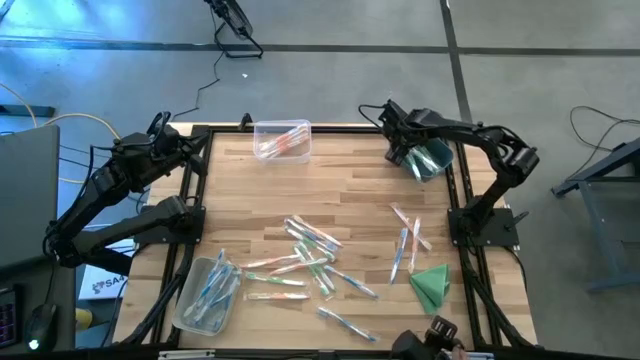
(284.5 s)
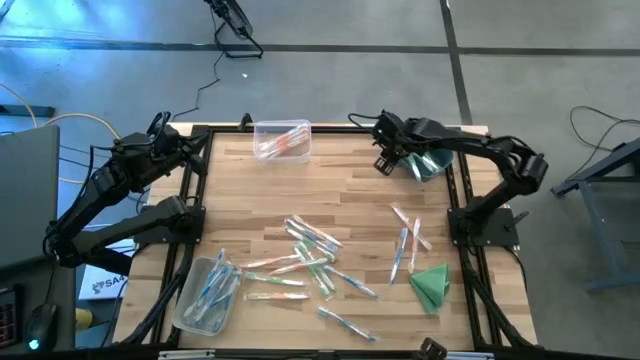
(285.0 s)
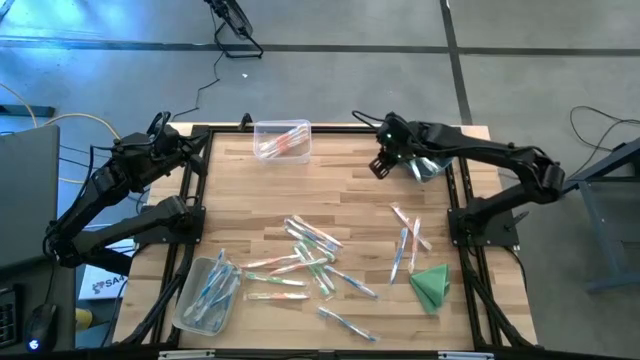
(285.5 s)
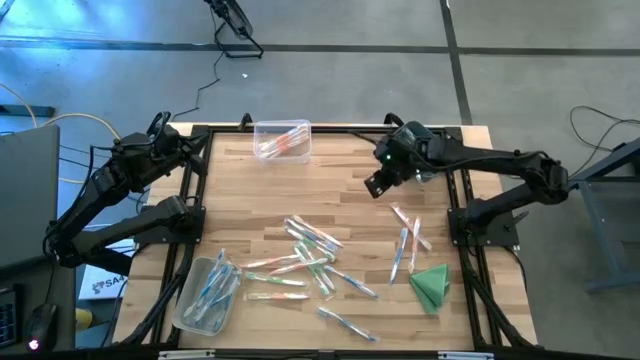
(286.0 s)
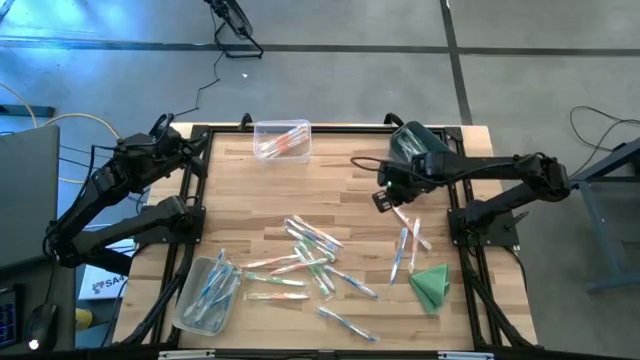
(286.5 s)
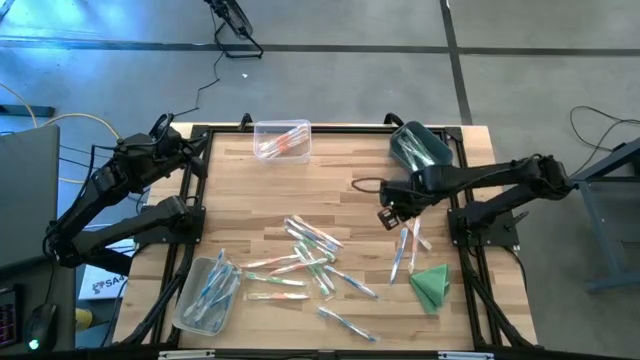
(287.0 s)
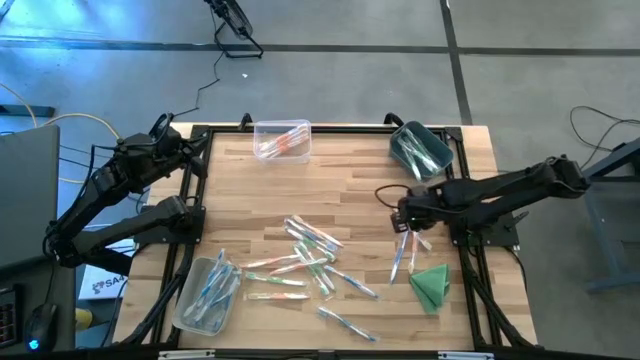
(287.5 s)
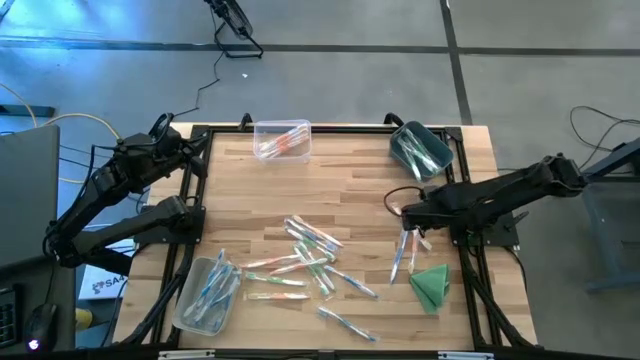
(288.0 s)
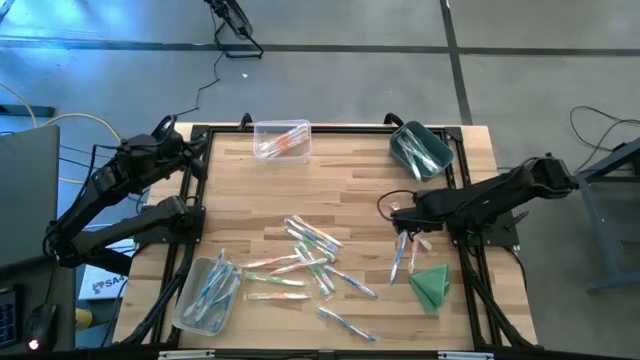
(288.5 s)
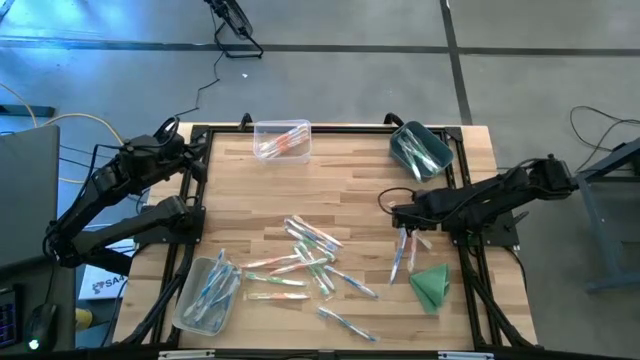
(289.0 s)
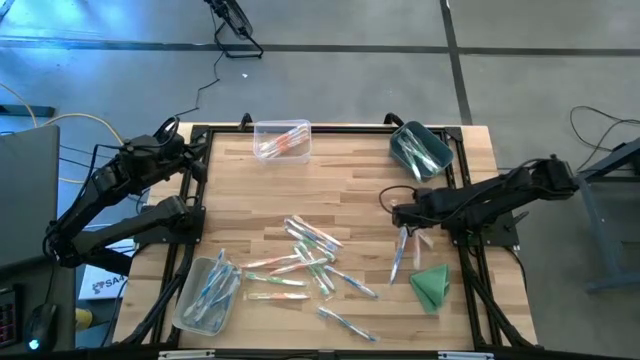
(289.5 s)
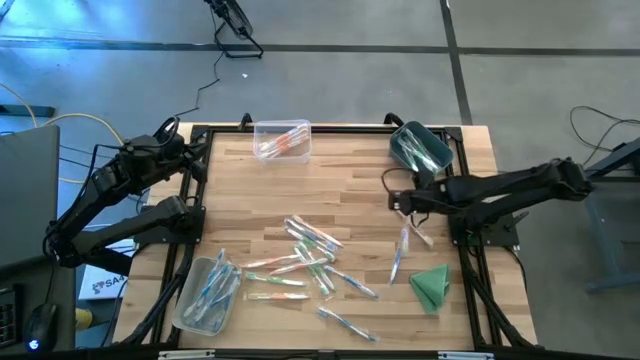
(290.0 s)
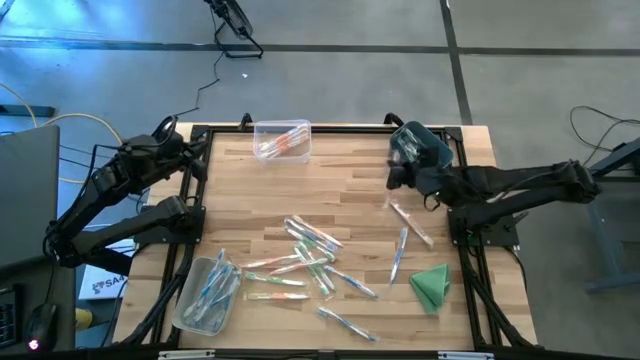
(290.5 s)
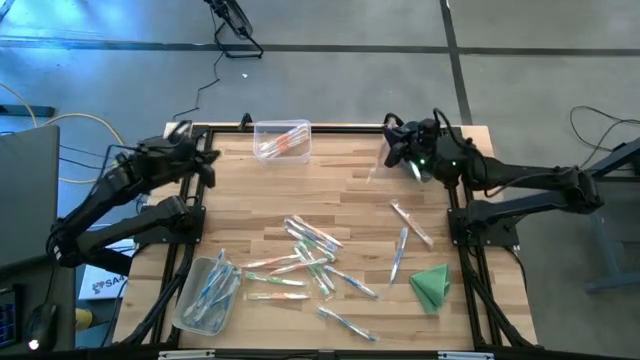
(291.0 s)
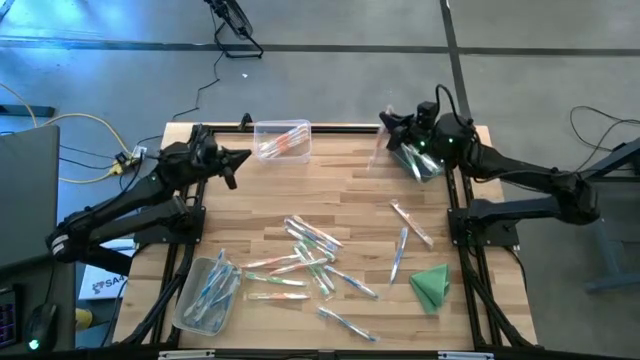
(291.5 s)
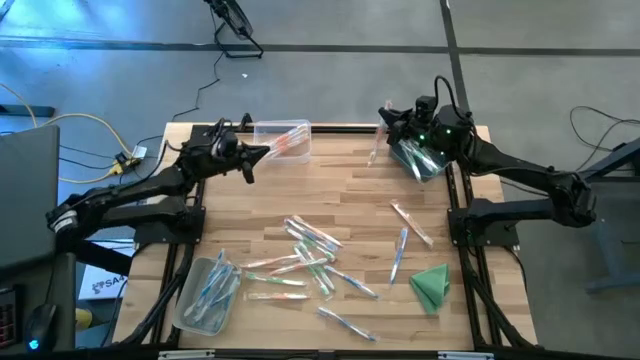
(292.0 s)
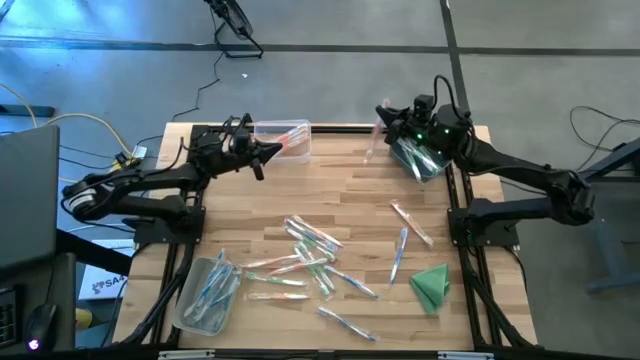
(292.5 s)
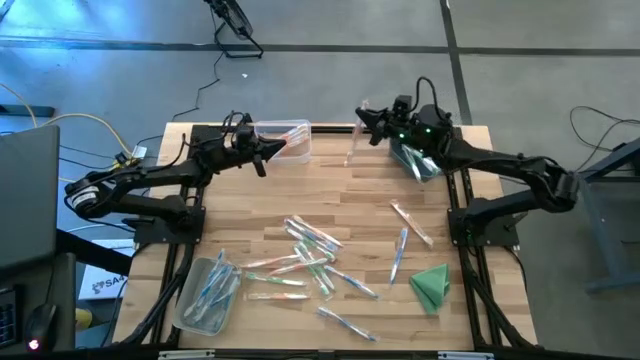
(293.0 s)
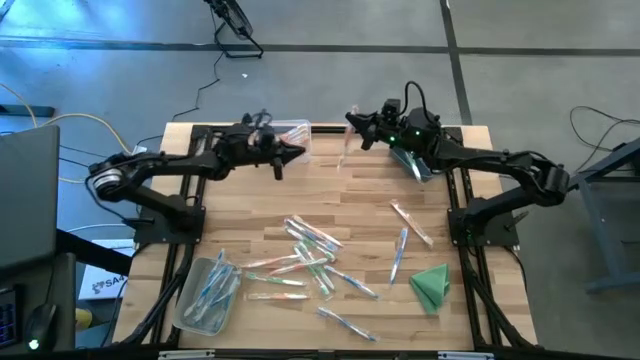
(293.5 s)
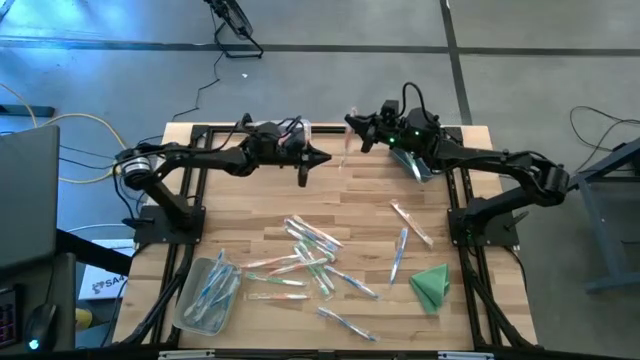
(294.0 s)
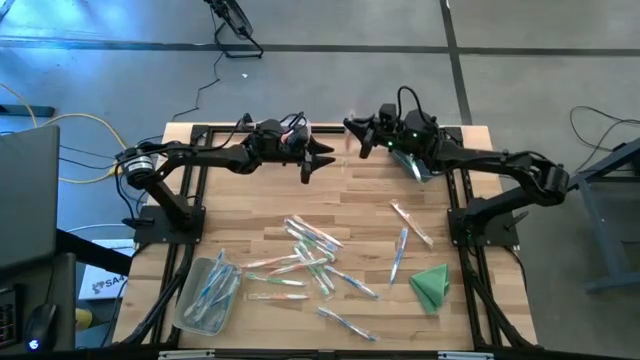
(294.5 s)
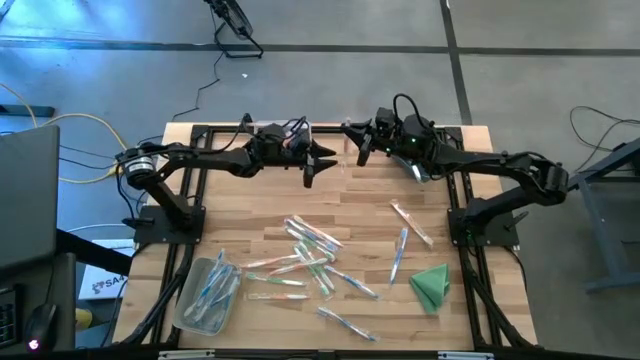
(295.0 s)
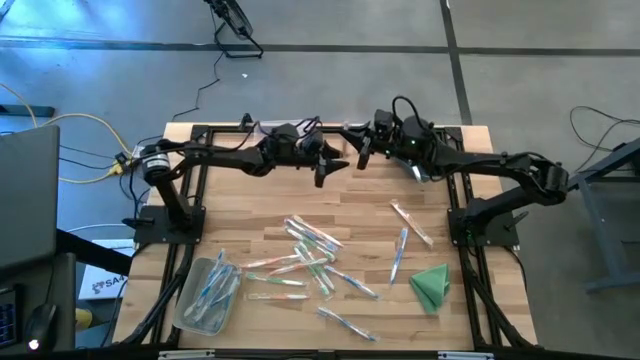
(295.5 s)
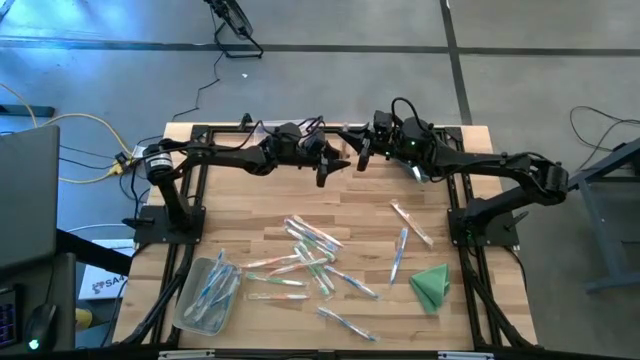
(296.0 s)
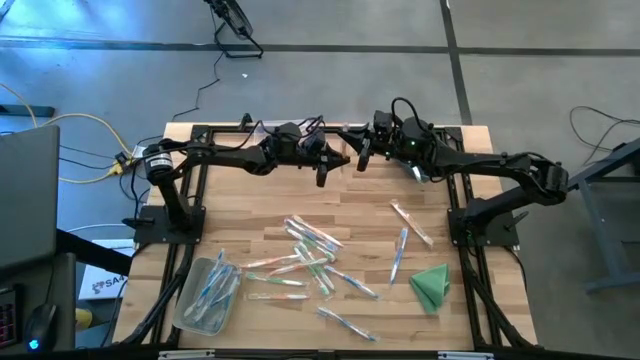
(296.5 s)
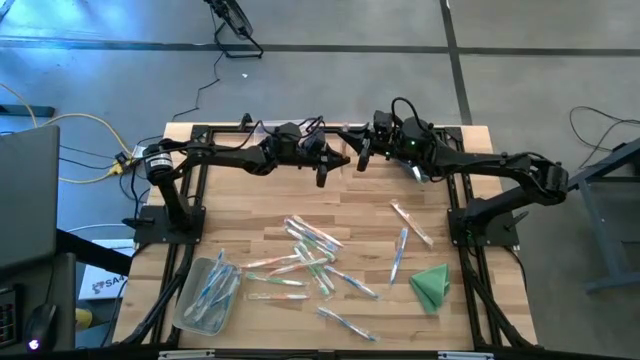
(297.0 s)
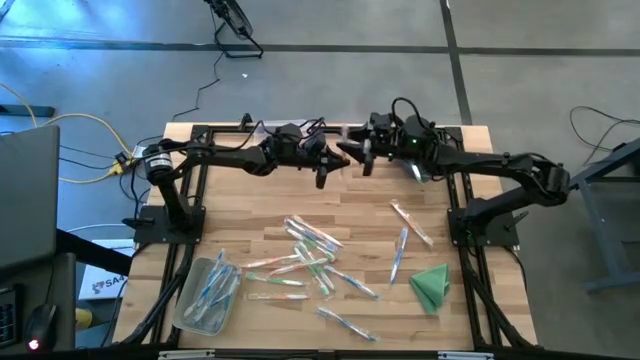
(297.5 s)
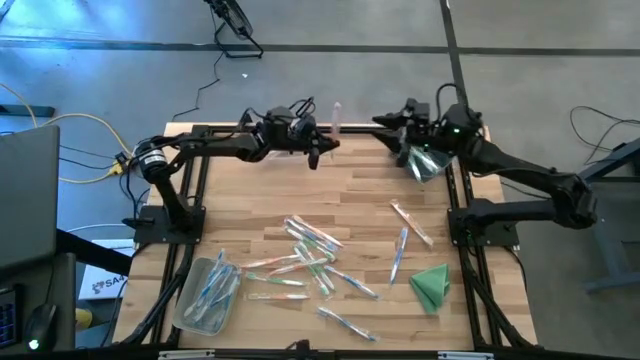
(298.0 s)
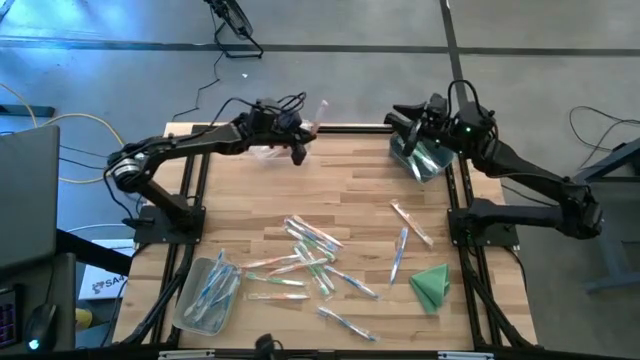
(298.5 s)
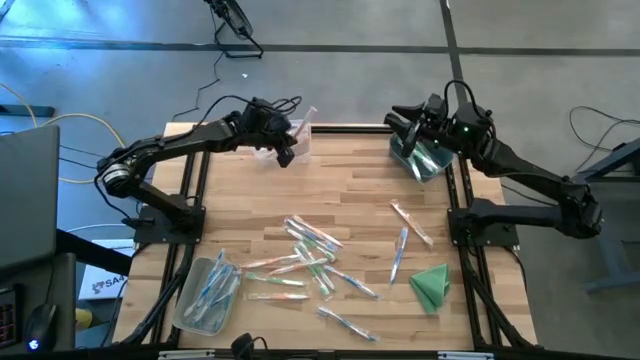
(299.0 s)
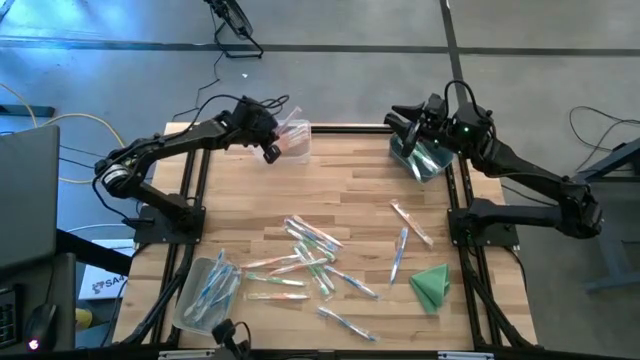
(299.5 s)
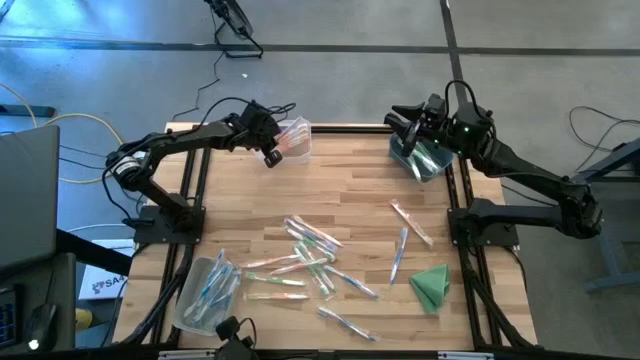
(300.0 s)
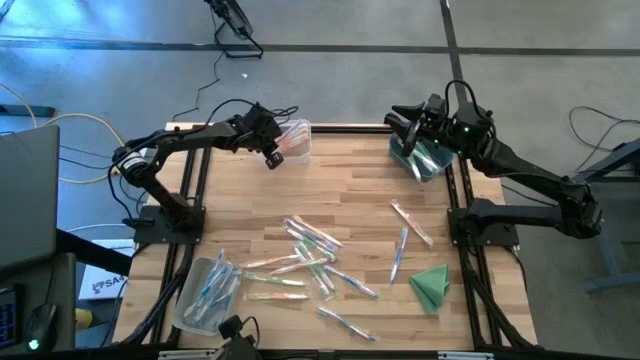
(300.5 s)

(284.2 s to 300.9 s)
Task: Pick & Place Toothbrushes
Put the orange toothbrush into the transparent bin
